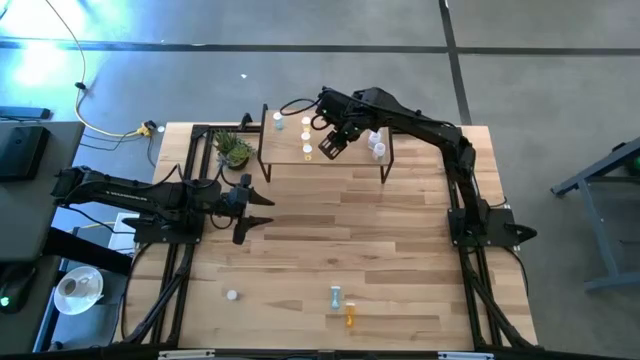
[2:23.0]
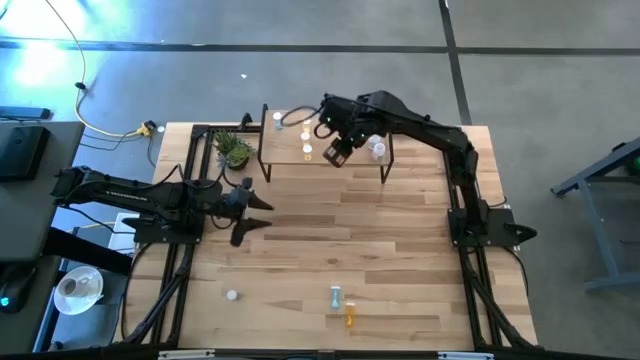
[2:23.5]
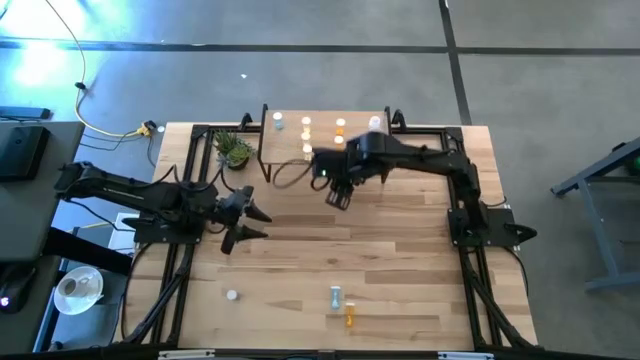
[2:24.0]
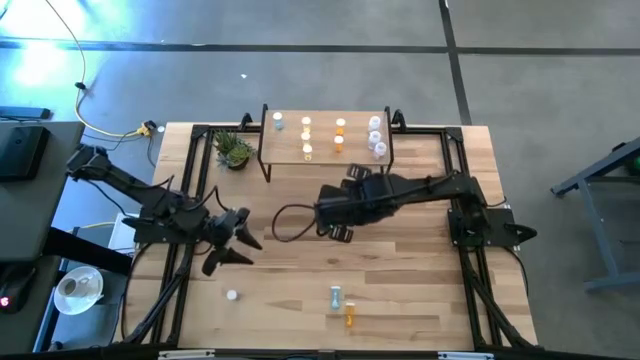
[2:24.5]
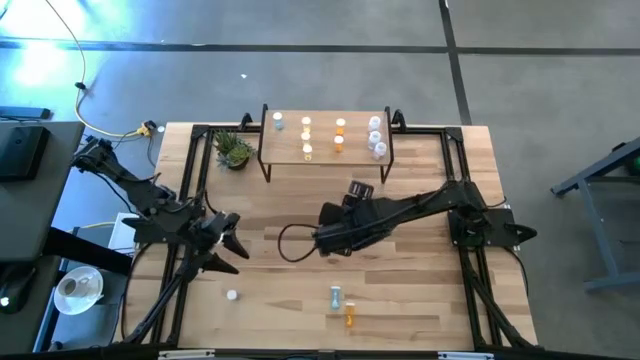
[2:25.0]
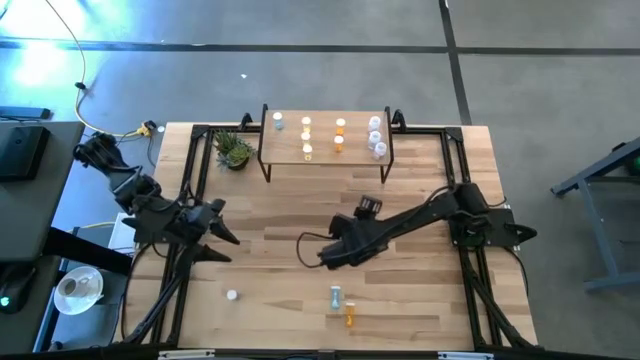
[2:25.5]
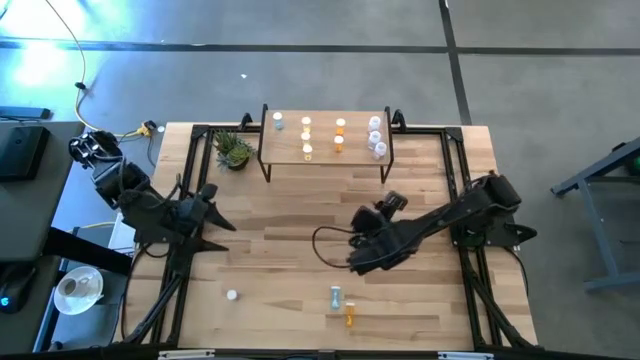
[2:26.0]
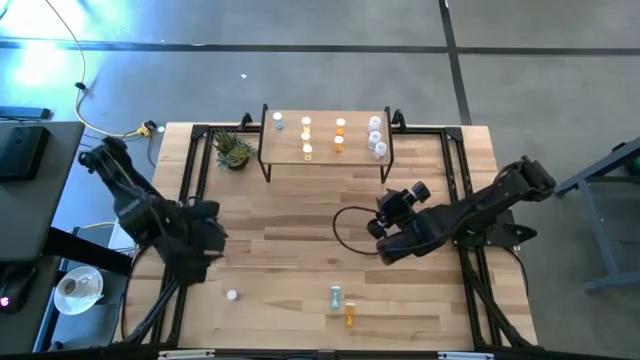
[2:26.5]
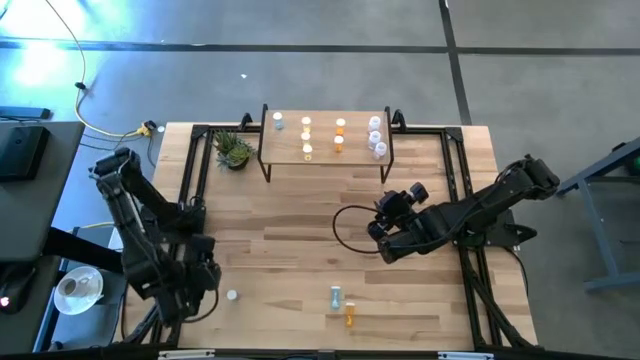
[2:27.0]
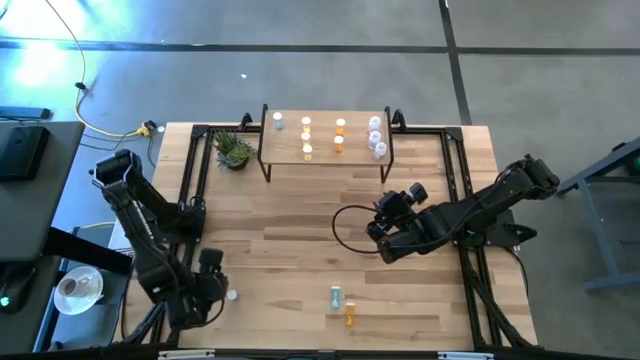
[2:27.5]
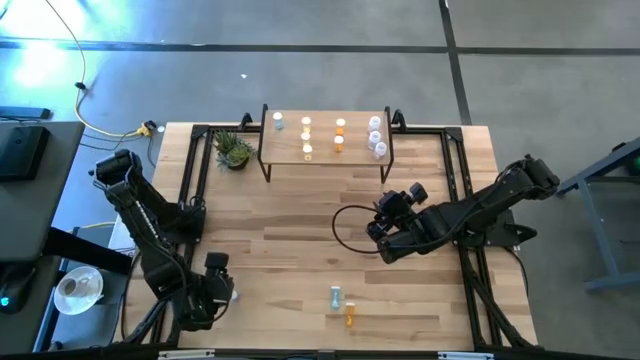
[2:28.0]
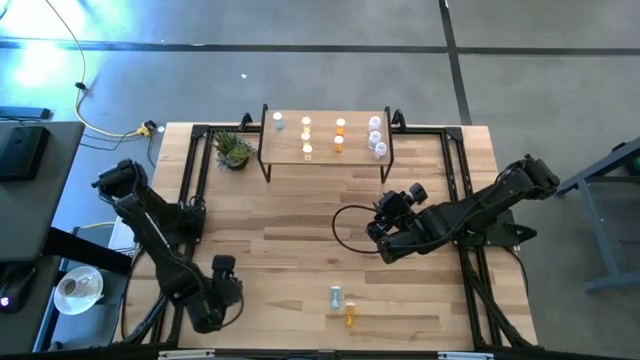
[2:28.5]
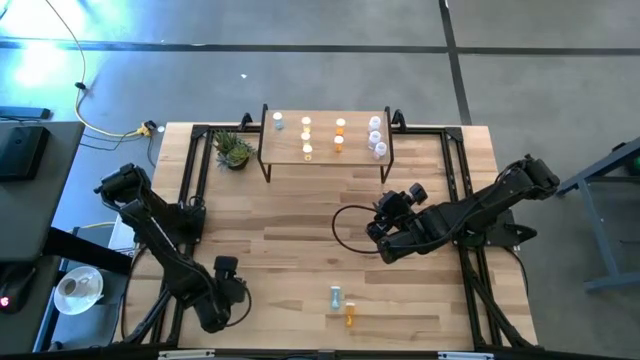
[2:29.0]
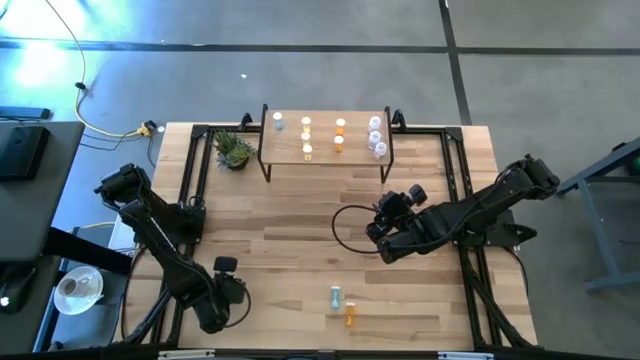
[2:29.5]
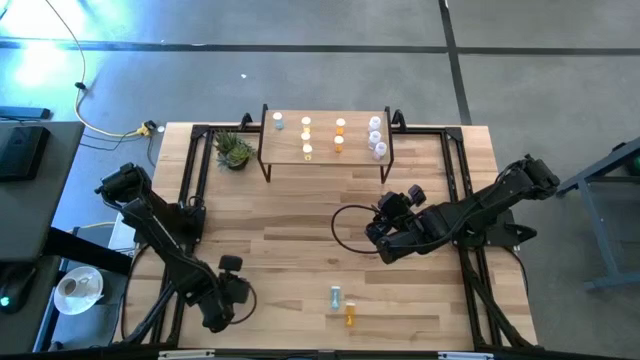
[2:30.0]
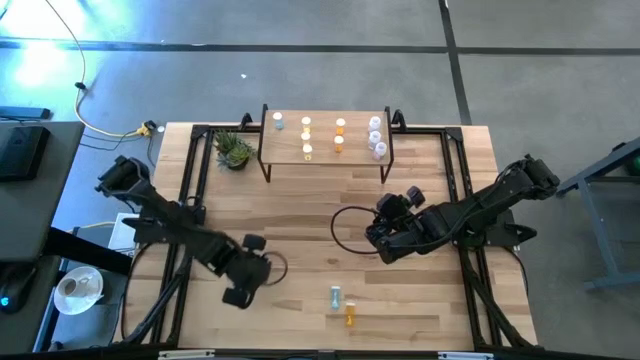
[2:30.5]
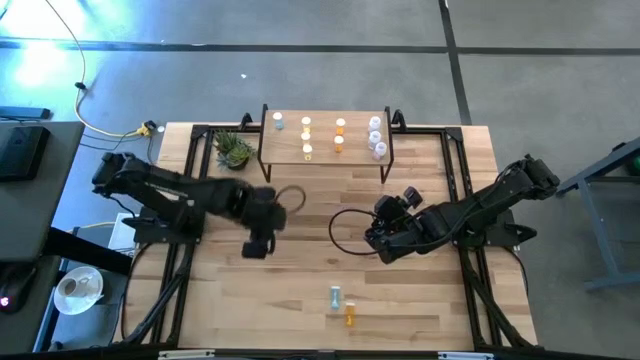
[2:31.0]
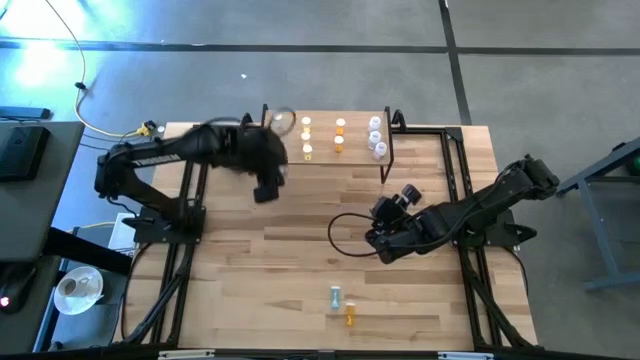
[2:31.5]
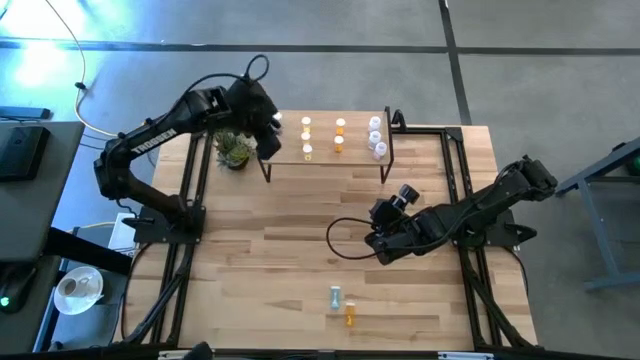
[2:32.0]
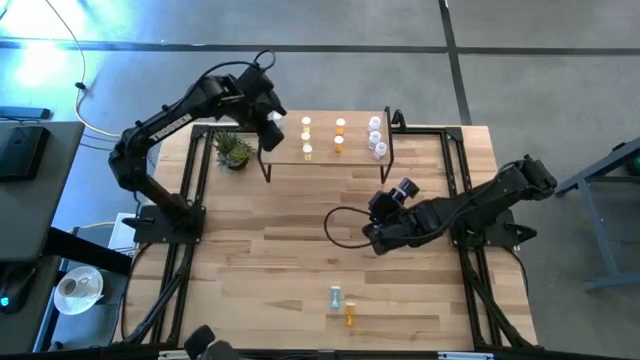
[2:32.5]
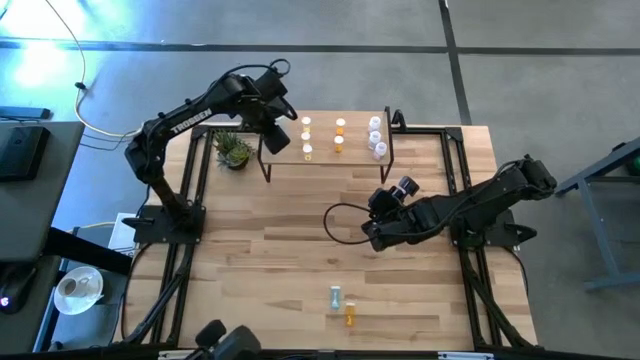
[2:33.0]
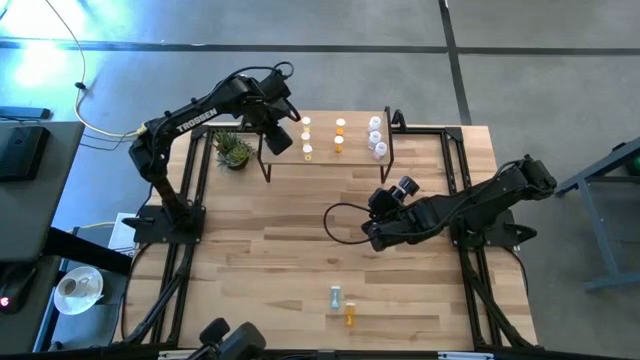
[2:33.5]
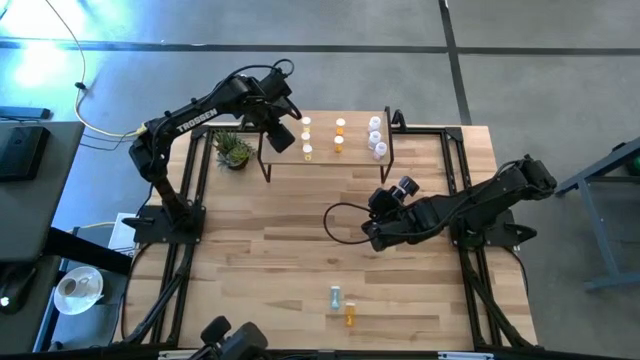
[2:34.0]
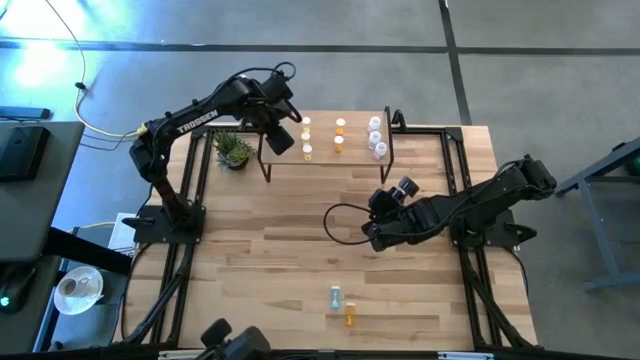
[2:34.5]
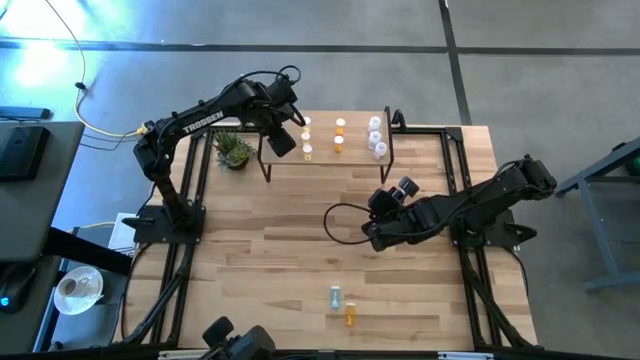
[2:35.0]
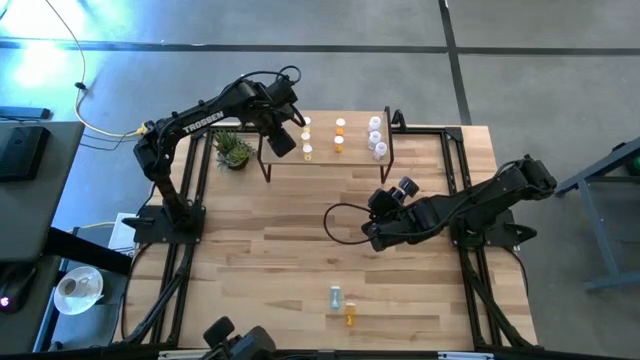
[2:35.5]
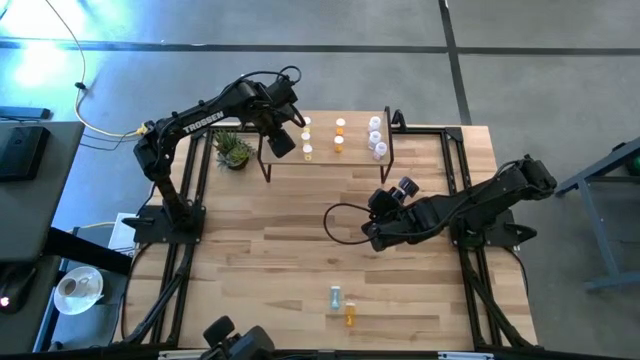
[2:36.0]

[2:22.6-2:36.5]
Task: Pick and place medicine bottles onto shelf by color
Put the left blue pill bottle on the shelf aligned with the blue pill bottle

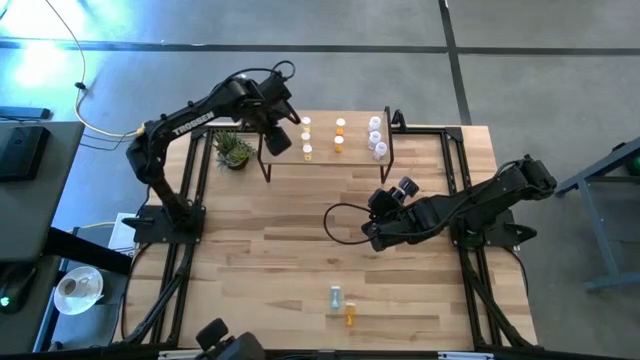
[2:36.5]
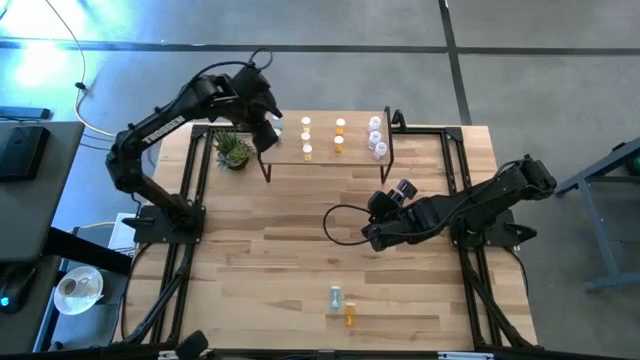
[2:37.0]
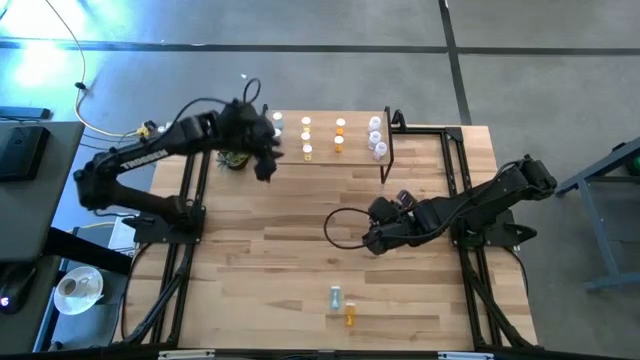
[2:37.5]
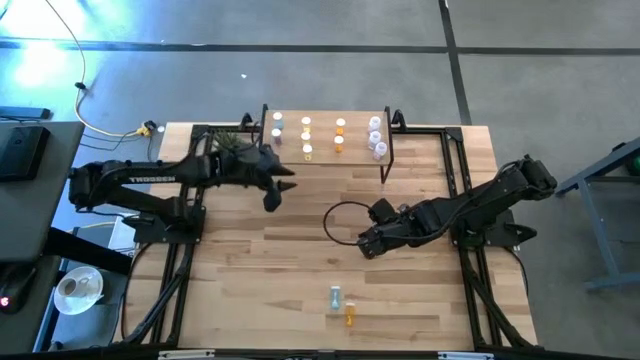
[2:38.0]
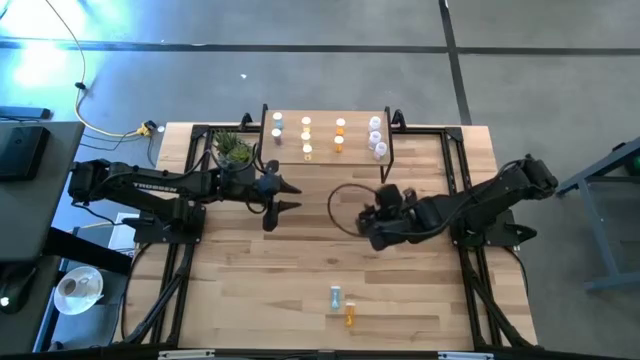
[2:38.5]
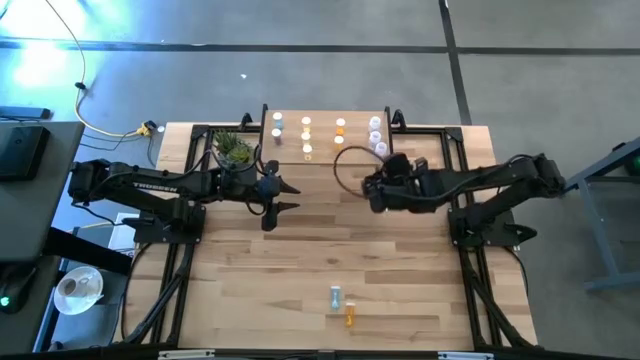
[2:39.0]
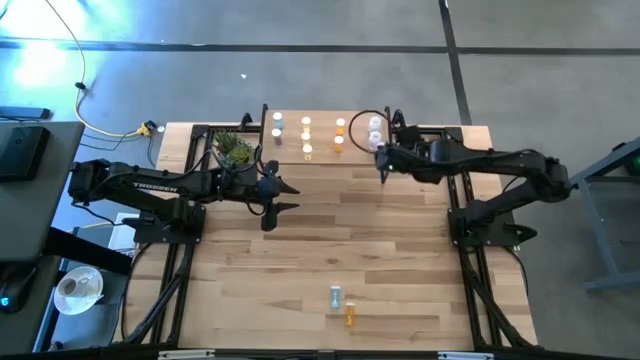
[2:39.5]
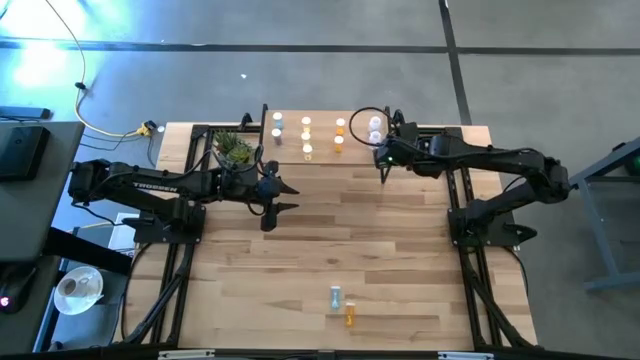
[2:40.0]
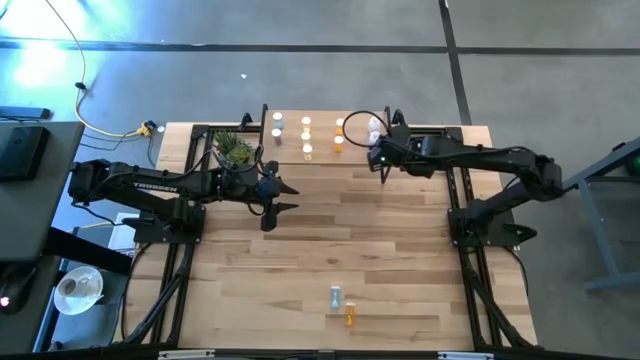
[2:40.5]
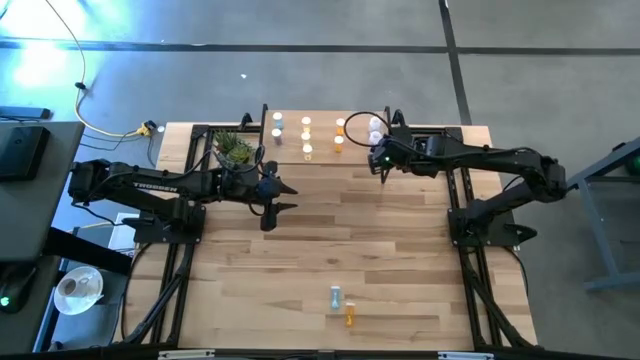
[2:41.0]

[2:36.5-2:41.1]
Adjust the transparent pill bottle on the shelf

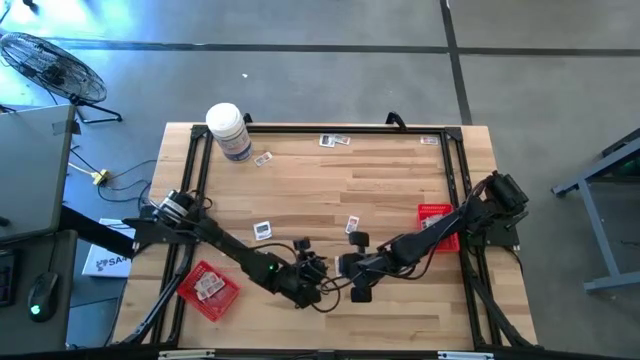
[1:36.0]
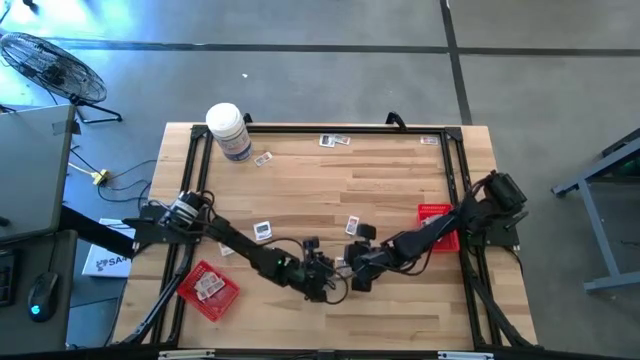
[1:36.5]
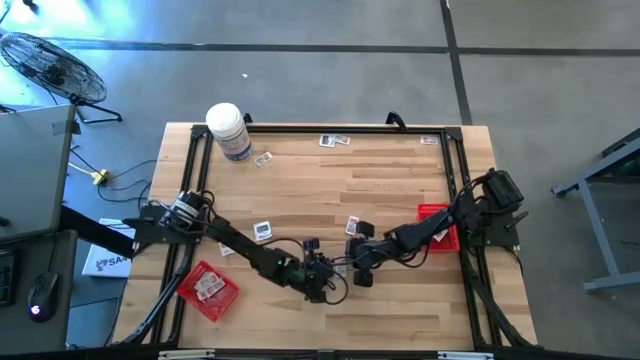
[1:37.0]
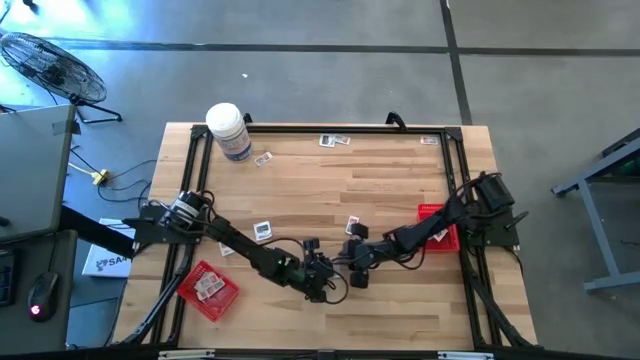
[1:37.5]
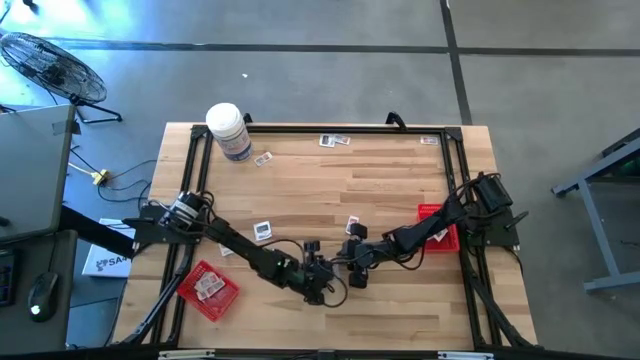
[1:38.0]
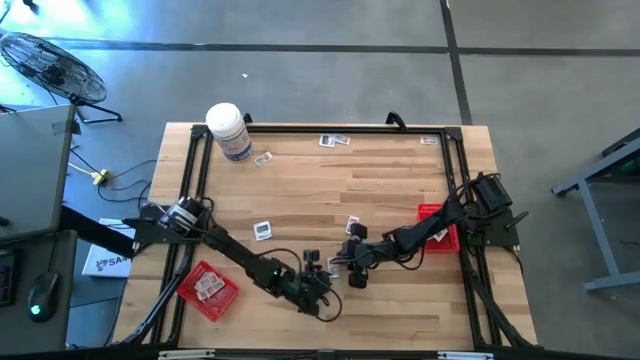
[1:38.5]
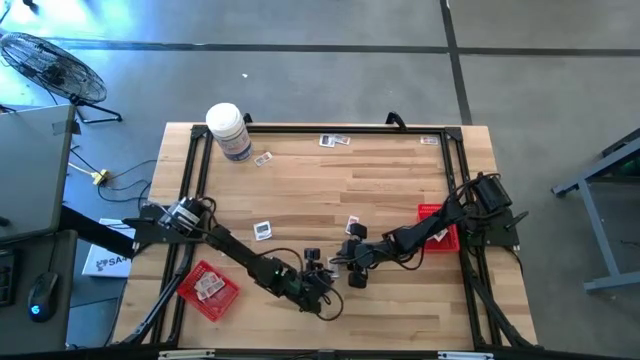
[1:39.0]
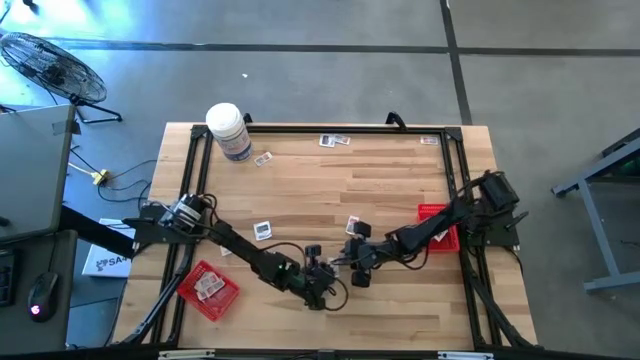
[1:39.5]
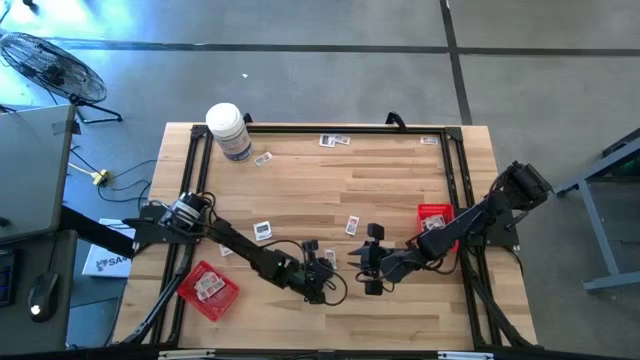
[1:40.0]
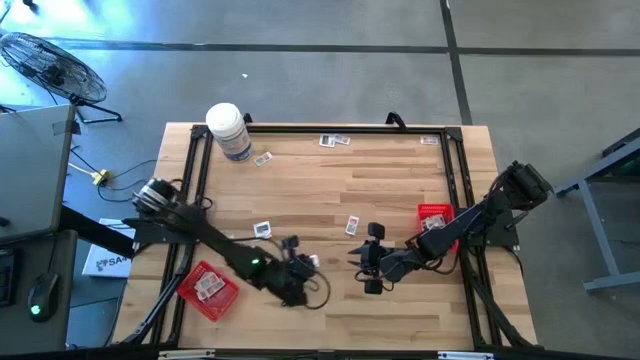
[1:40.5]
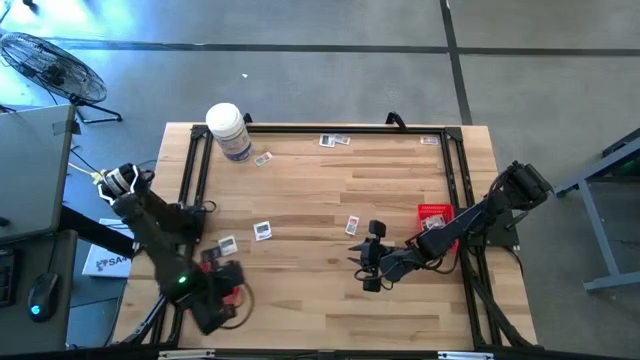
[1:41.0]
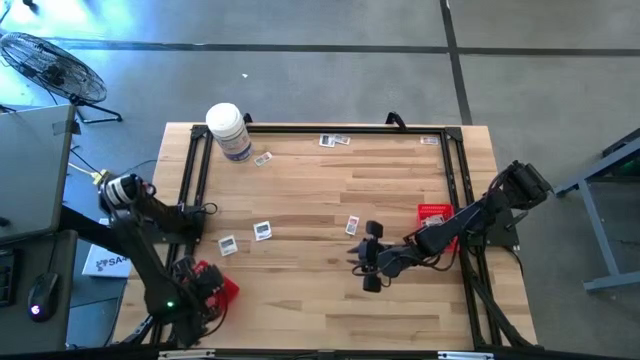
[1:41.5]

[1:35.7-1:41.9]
Task: Pick & Place First Aid Supplies
Put the ointment pack into the left red bin
